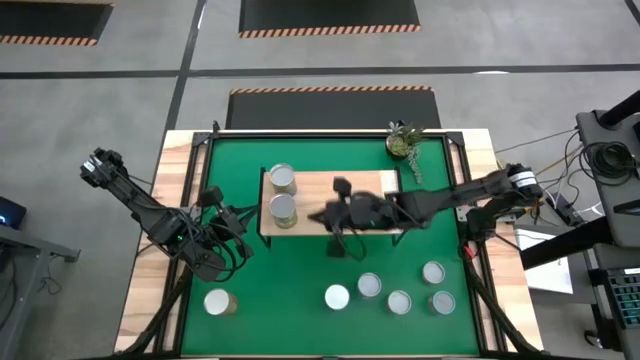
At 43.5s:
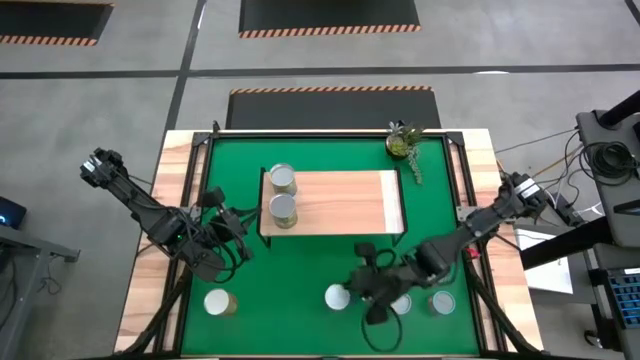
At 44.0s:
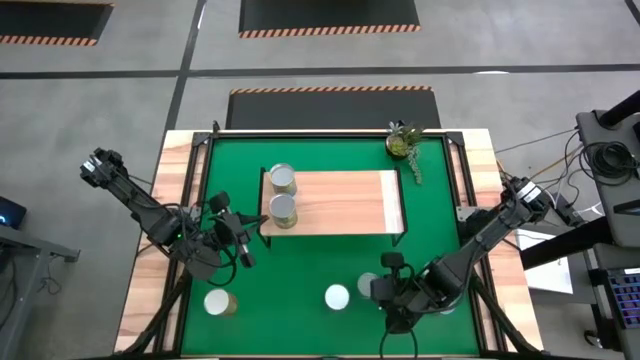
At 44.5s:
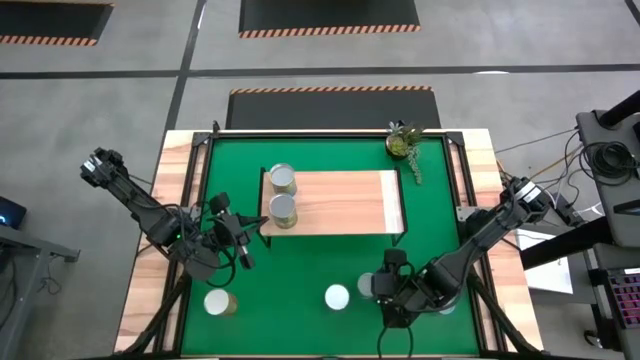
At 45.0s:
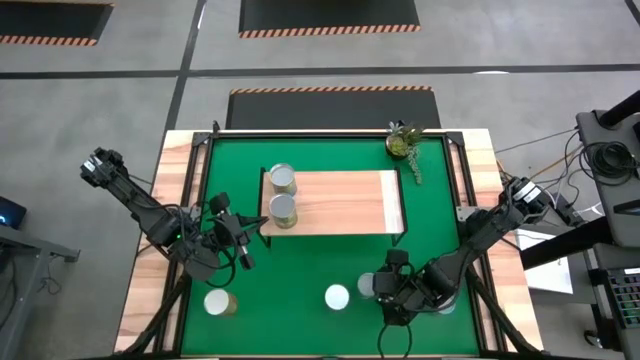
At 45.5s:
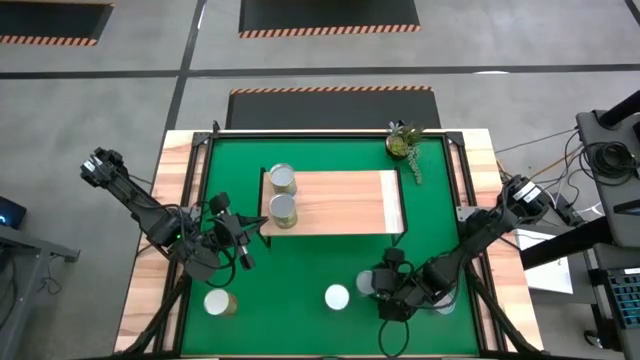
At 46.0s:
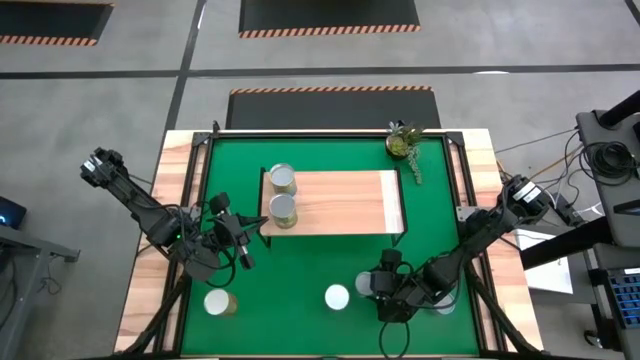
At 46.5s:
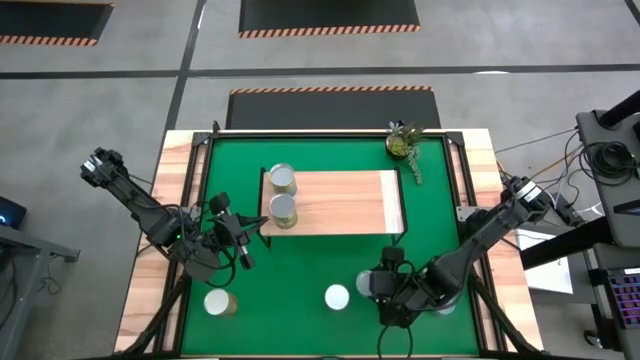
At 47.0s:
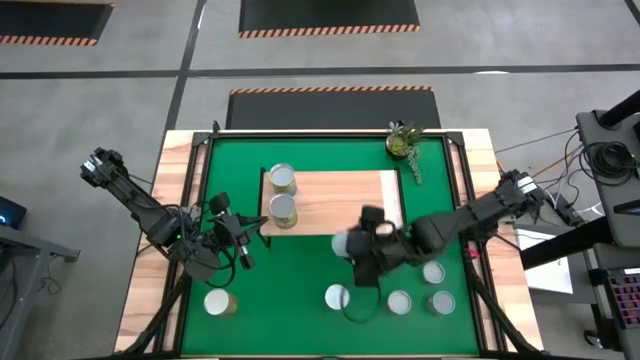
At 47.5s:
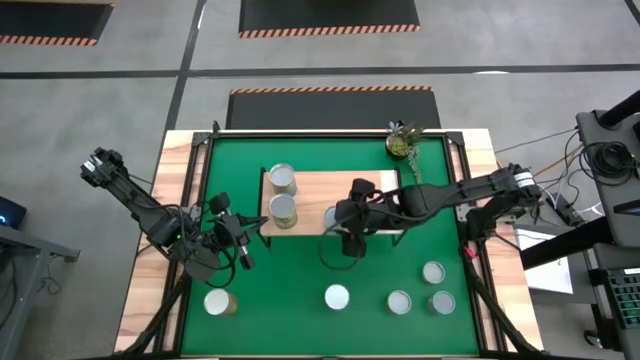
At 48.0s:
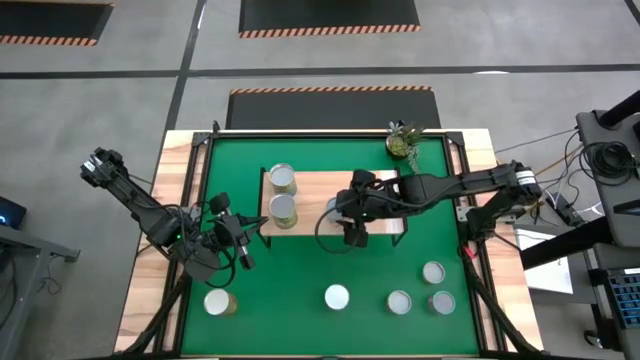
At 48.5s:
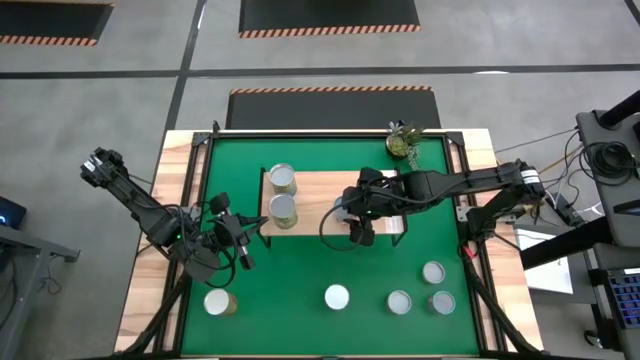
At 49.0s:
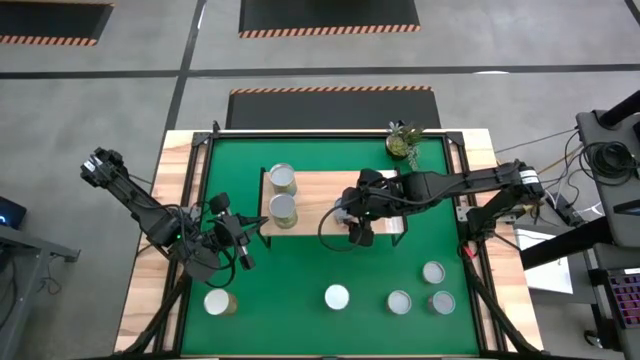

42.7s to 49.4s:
Task: Pick and place cans onto a shelf
Put the canned mixed fruit on the shelf

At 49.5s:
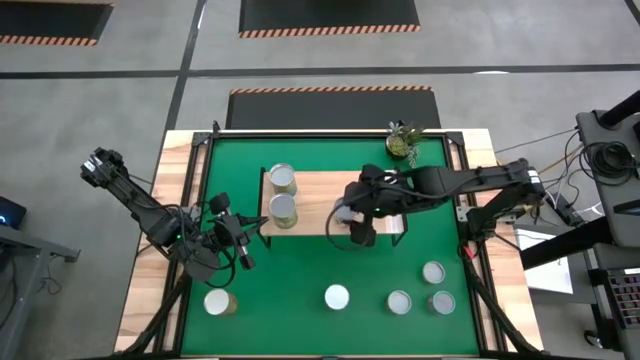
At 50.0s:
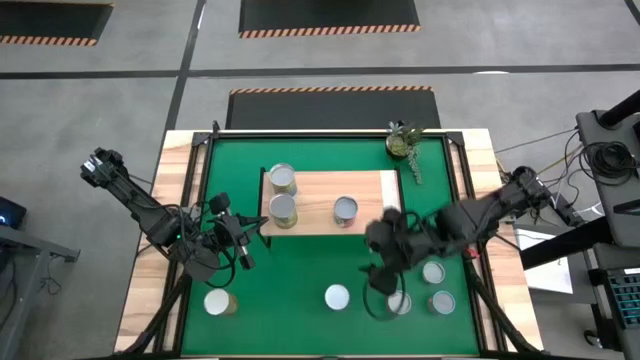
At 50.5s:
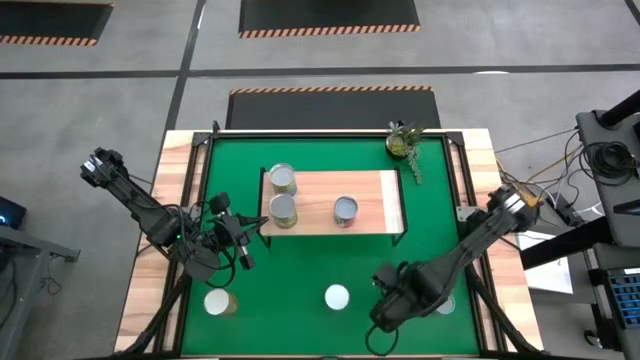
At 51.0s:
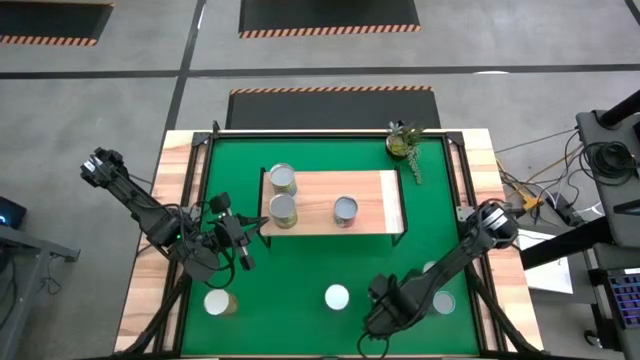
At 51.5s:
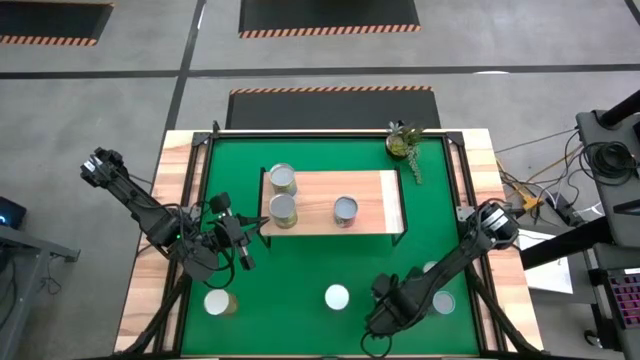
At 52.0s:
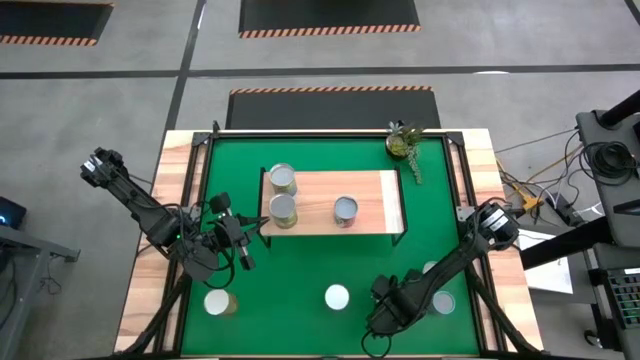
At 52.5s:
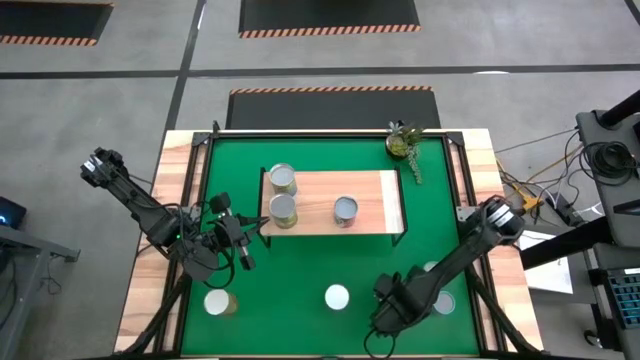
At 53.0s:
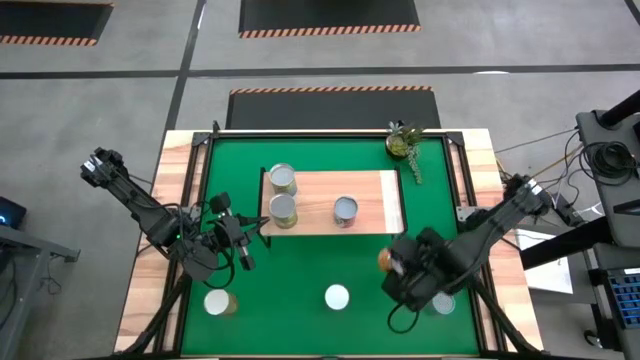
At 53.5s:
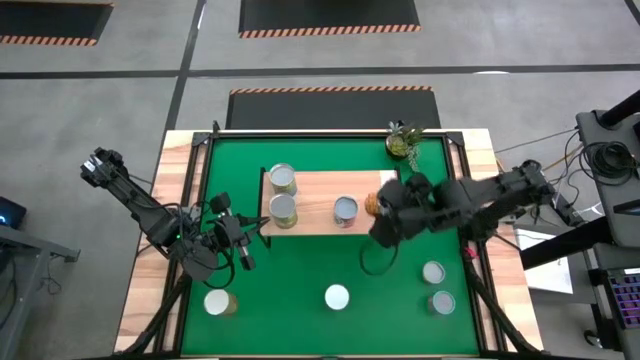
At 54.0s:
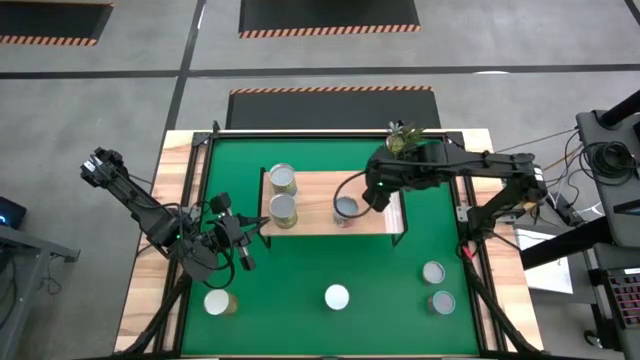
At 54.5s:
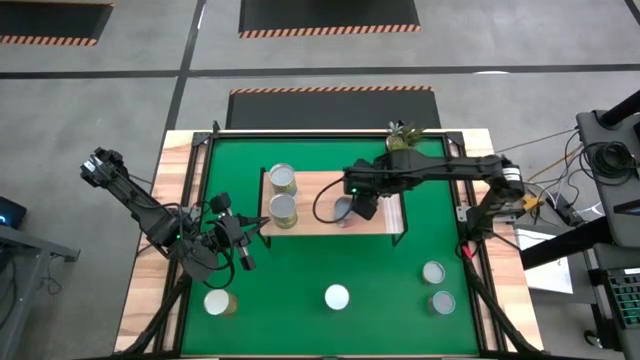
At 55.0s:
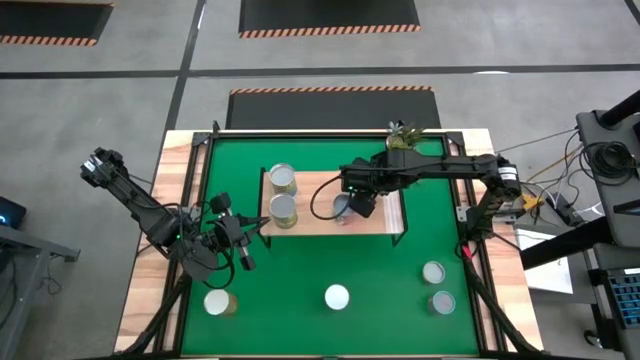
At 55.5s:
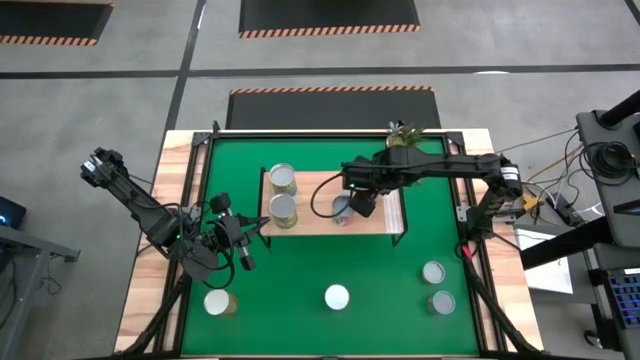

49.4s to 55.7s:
Put the canned bean on the shelf

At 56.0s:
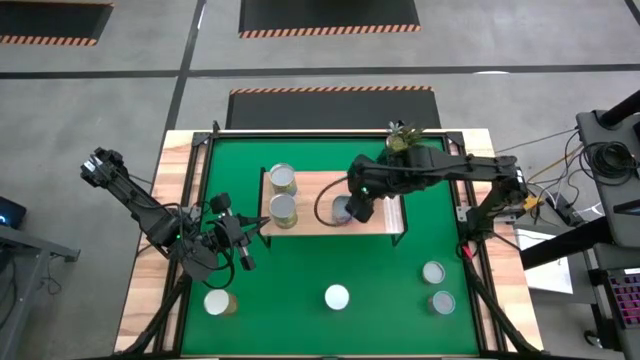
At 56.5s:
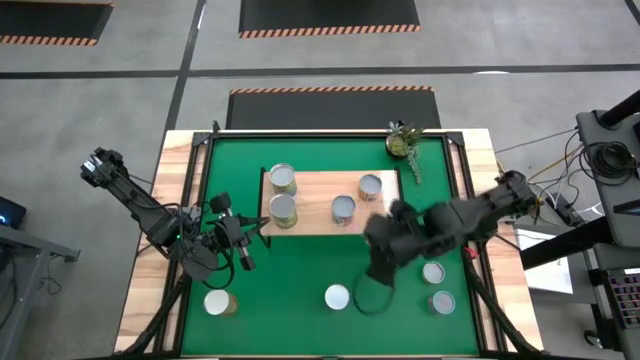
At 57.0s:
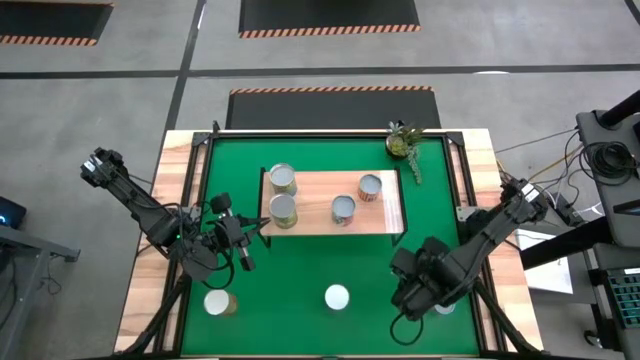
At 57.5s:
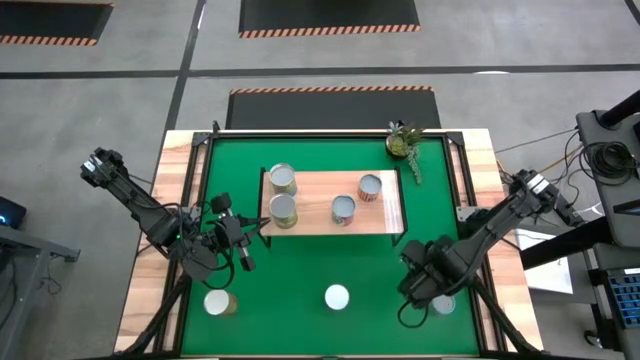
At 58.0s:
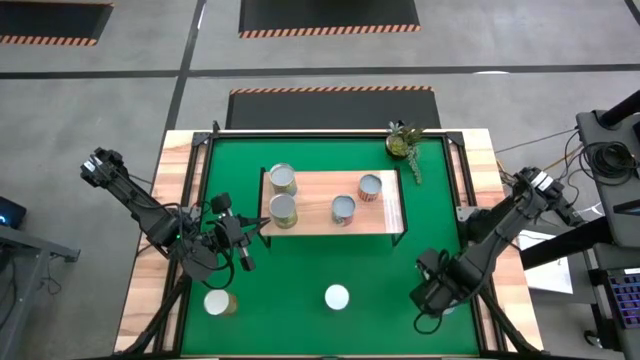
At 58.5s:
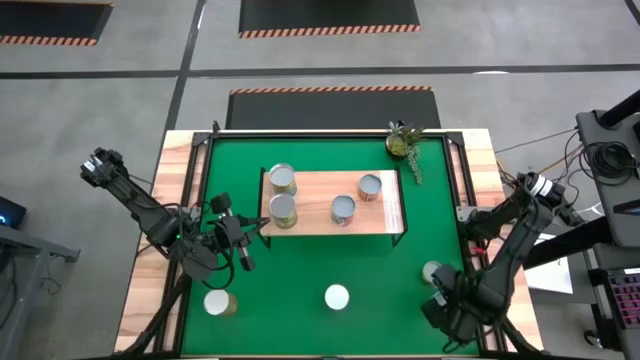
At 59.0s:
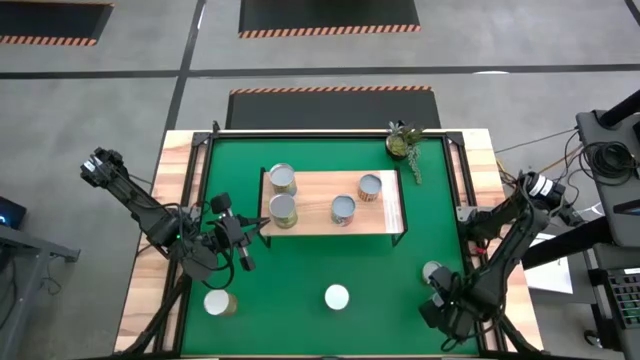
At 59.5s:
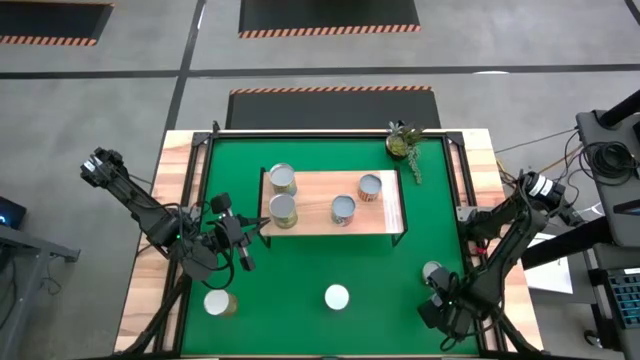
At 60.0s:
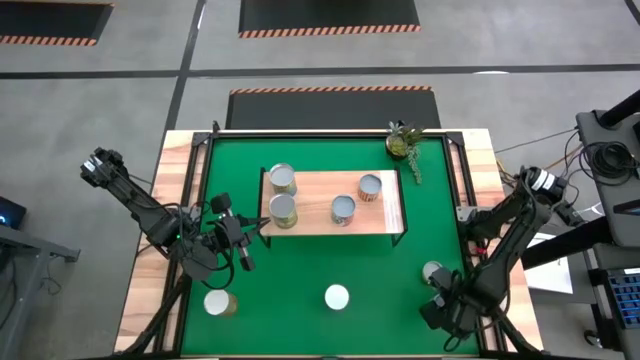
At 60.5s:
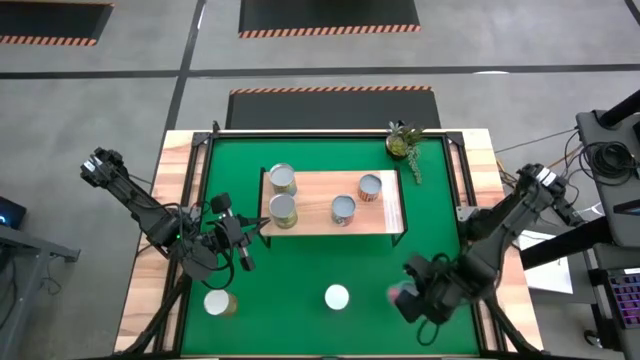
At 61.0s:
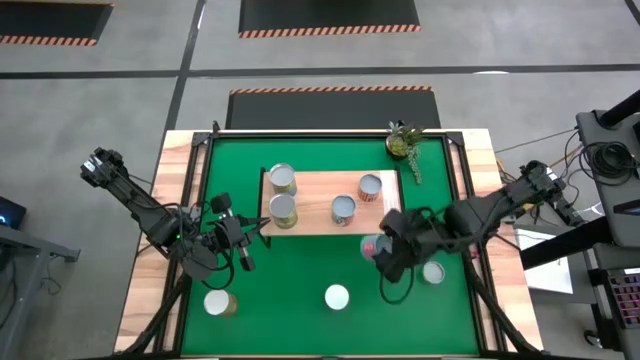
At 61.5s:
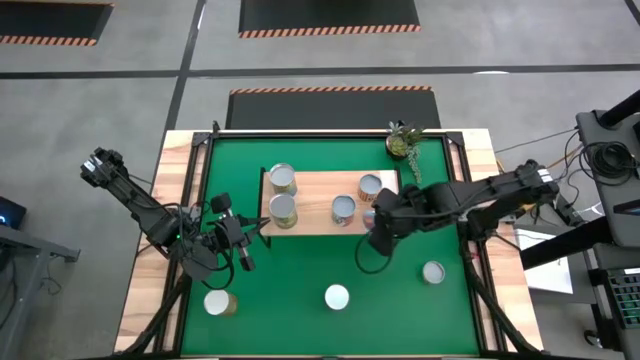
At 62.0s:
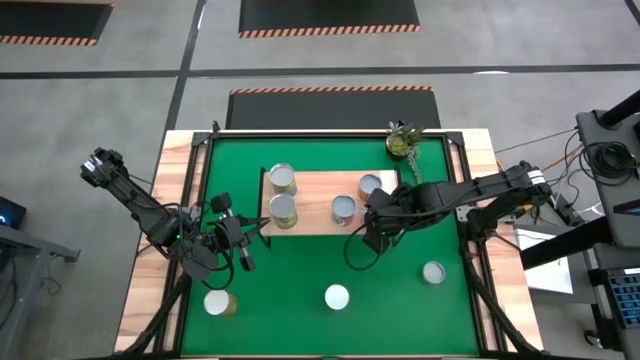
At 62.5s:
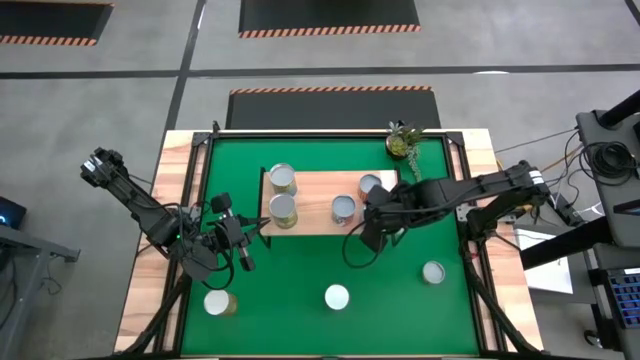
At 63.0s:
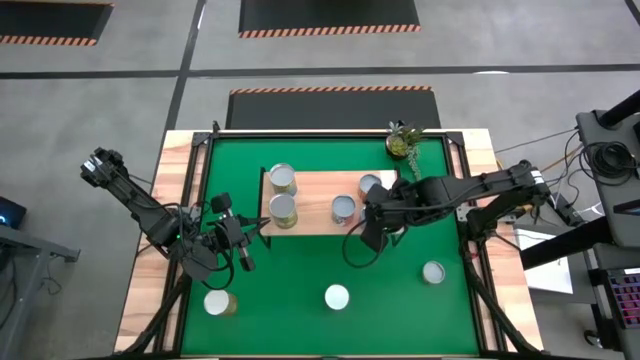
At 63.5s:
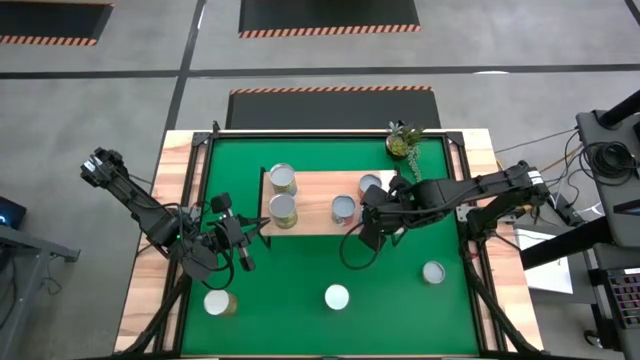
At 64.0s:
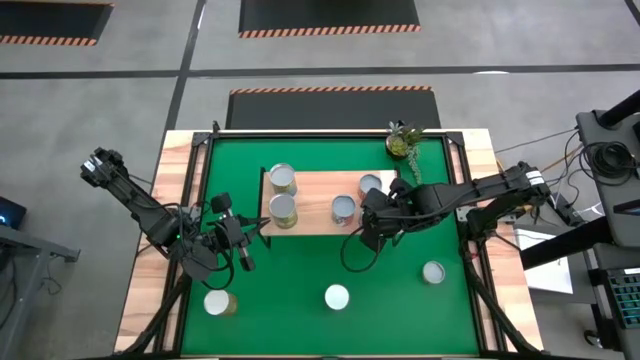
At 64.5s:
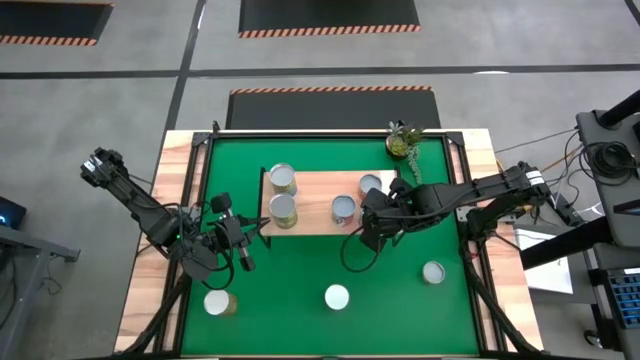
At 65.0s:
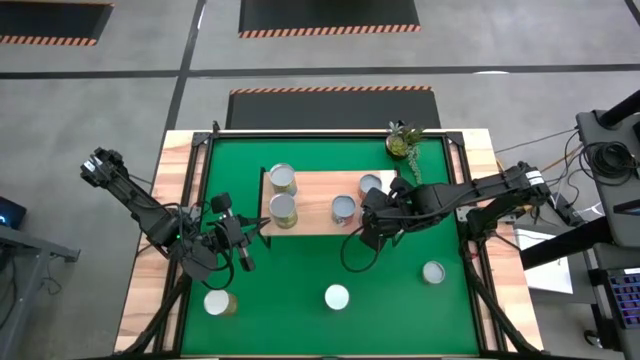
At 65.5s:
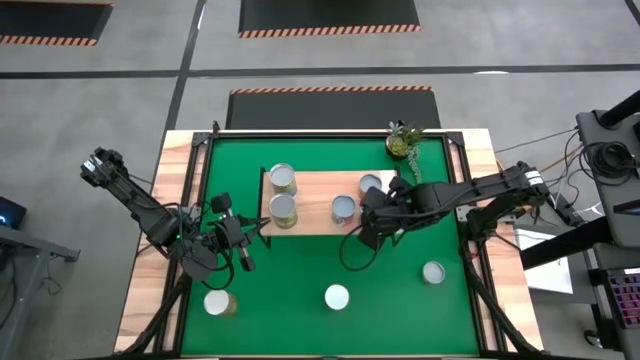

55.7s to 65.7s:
Put the canned blue on the shelf
